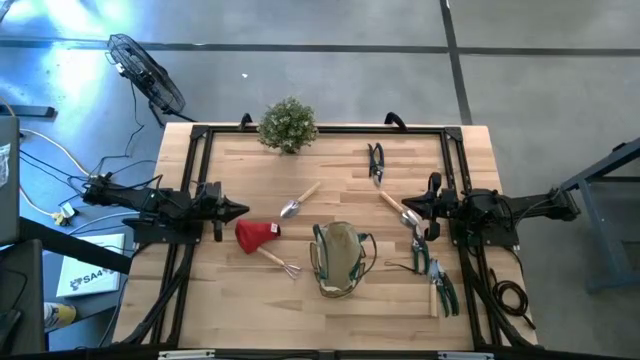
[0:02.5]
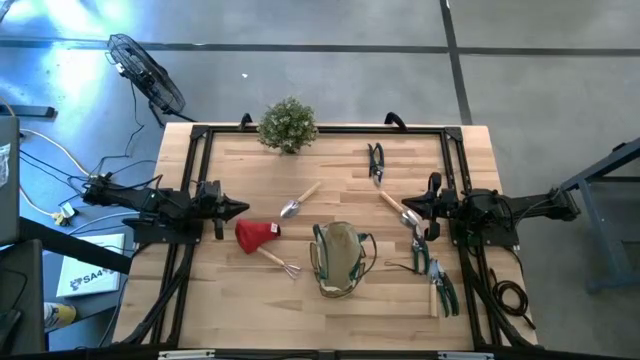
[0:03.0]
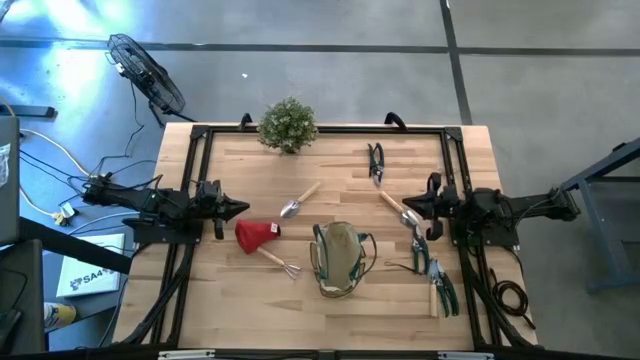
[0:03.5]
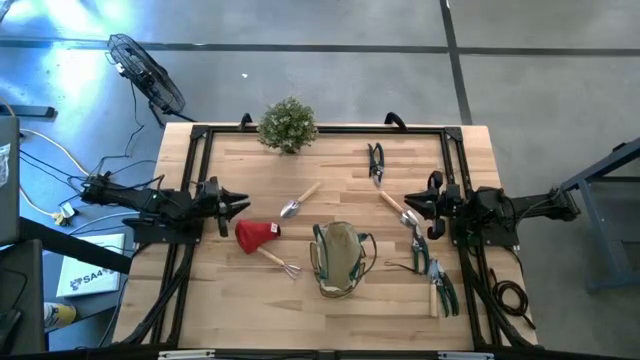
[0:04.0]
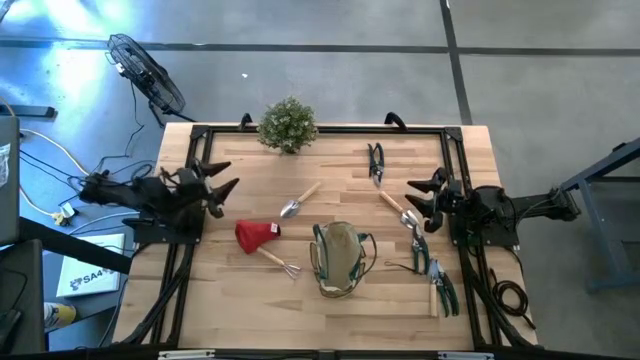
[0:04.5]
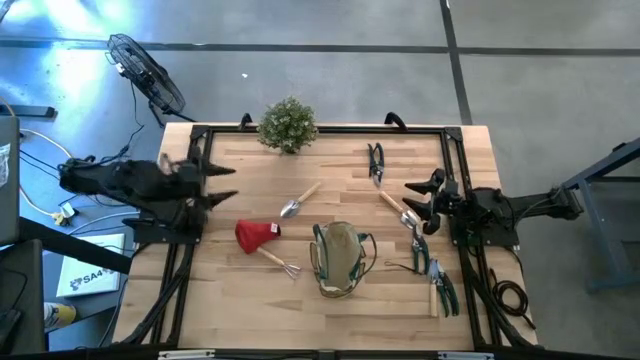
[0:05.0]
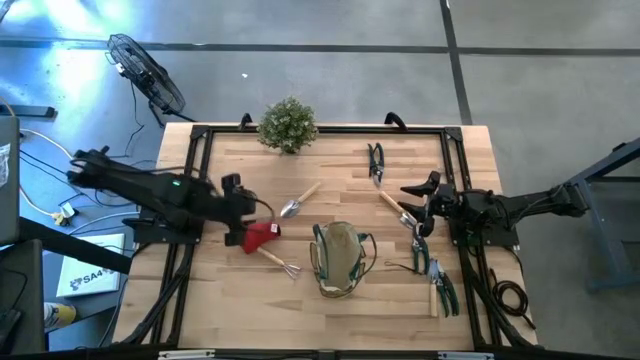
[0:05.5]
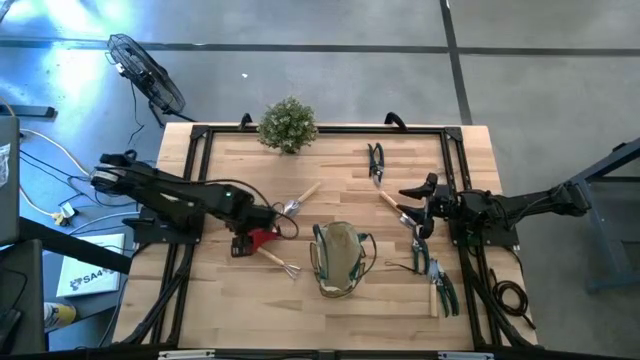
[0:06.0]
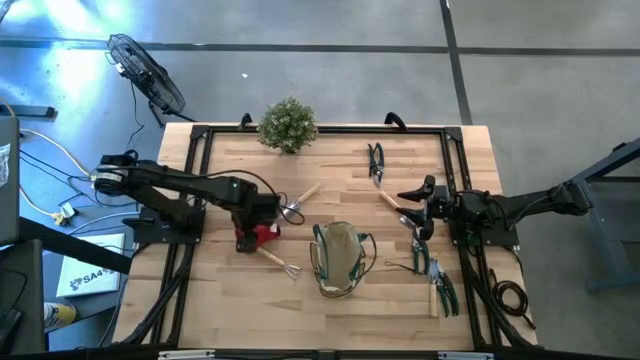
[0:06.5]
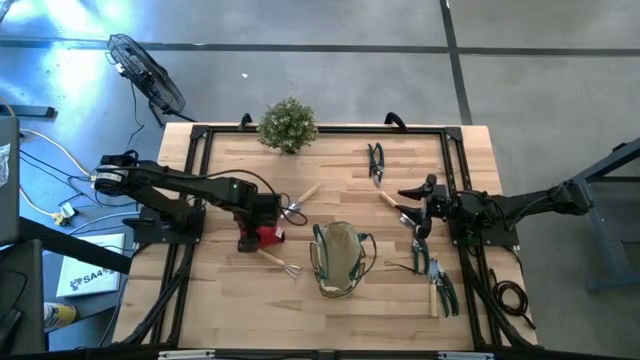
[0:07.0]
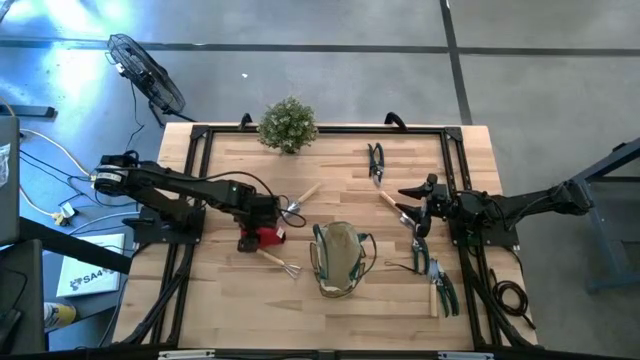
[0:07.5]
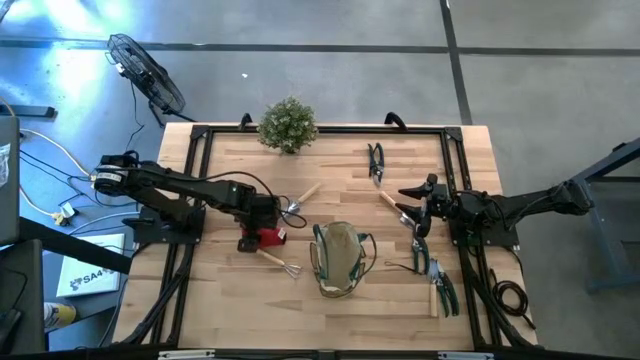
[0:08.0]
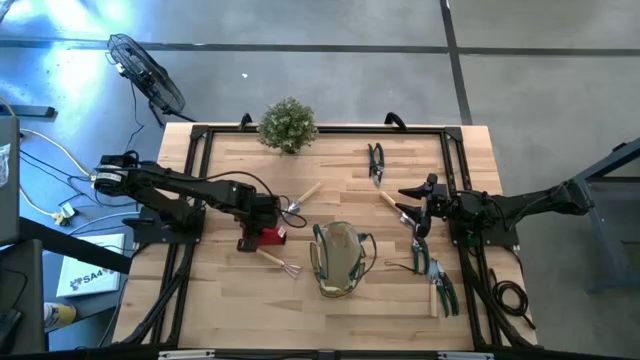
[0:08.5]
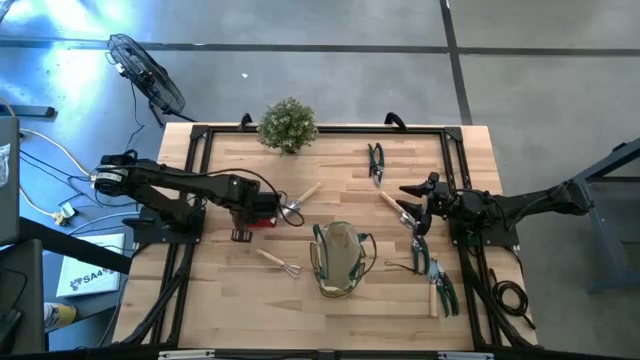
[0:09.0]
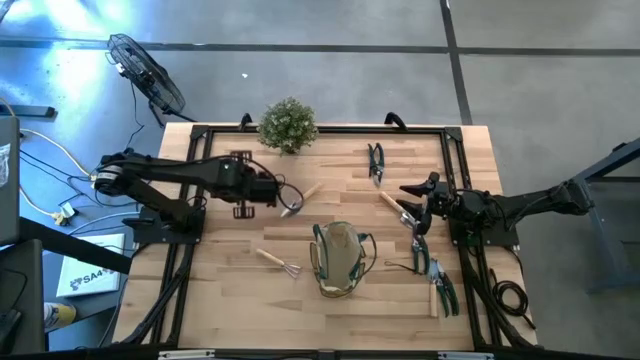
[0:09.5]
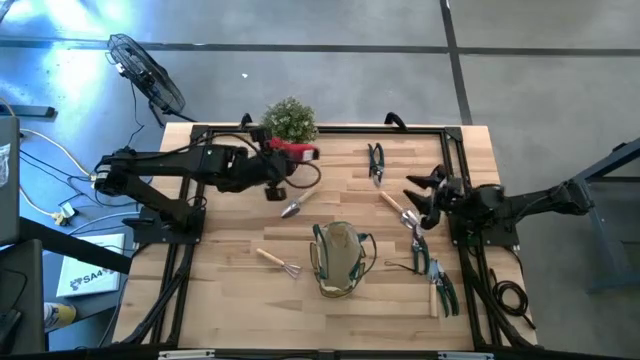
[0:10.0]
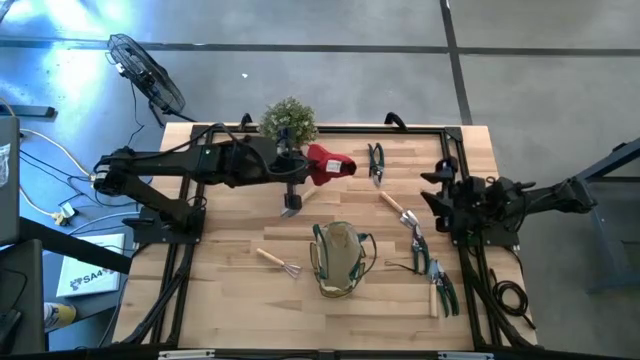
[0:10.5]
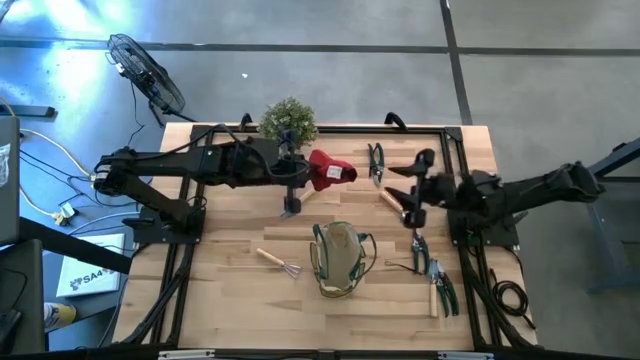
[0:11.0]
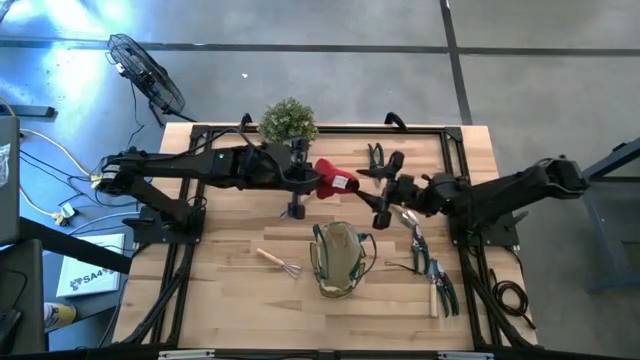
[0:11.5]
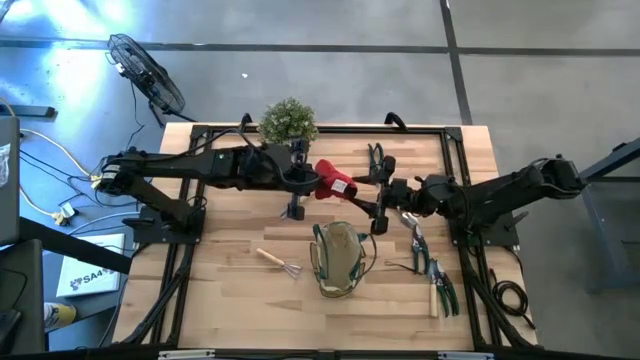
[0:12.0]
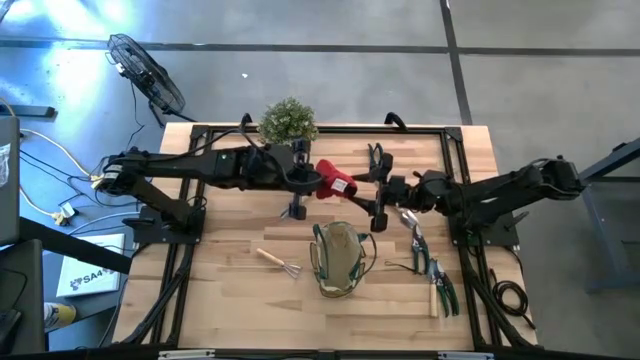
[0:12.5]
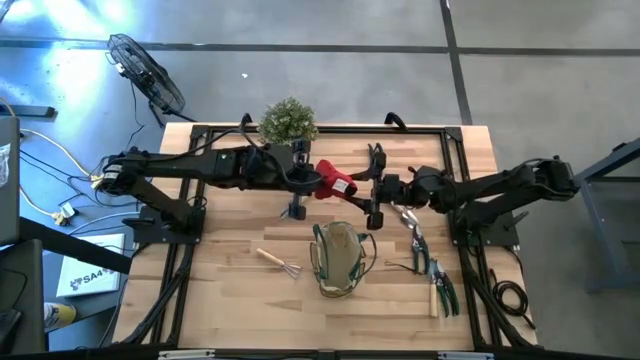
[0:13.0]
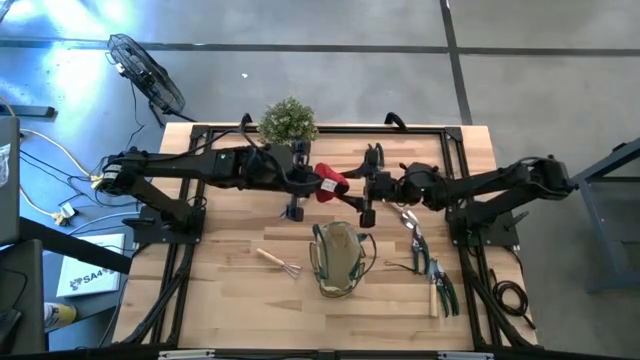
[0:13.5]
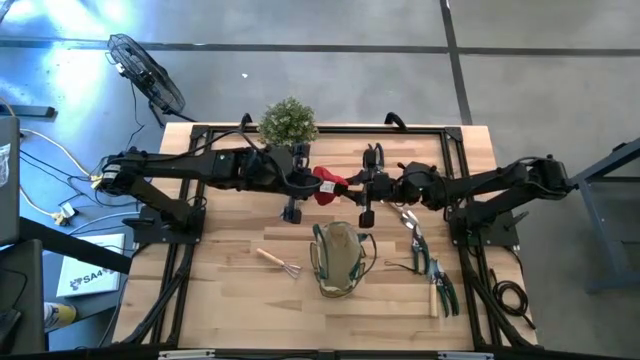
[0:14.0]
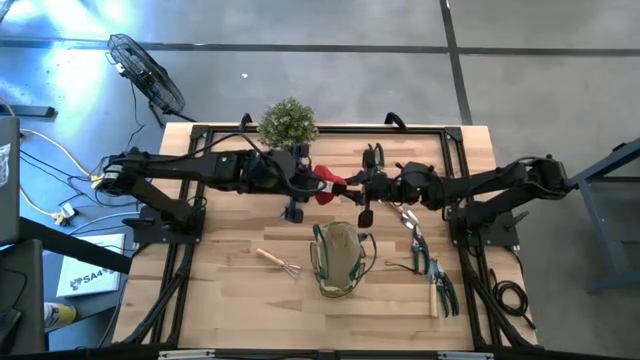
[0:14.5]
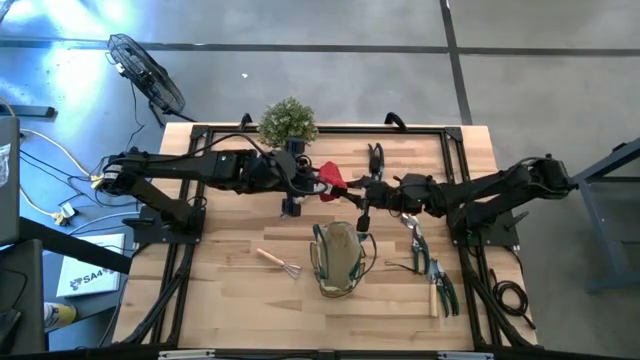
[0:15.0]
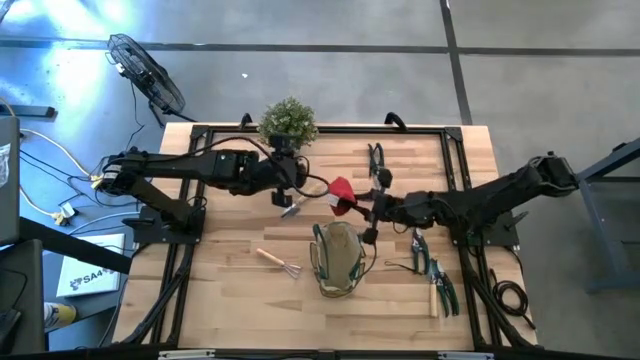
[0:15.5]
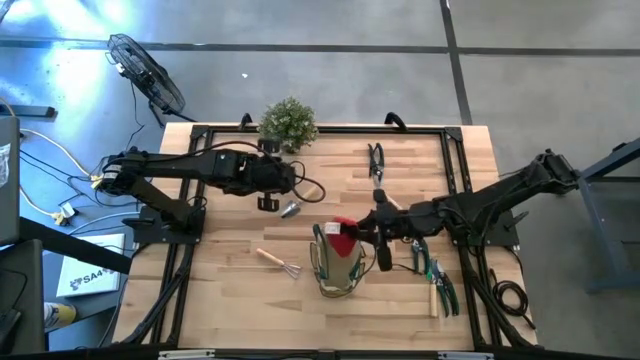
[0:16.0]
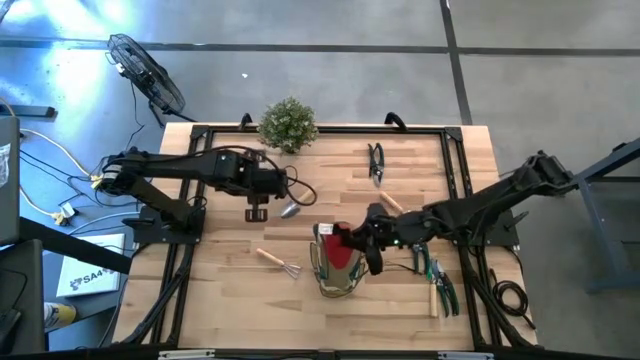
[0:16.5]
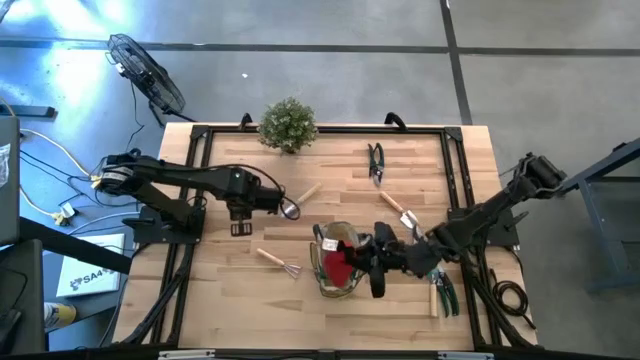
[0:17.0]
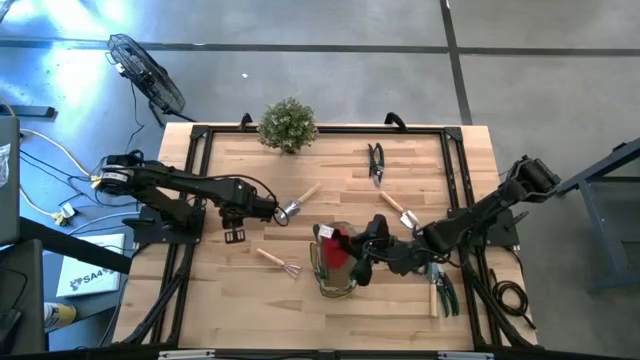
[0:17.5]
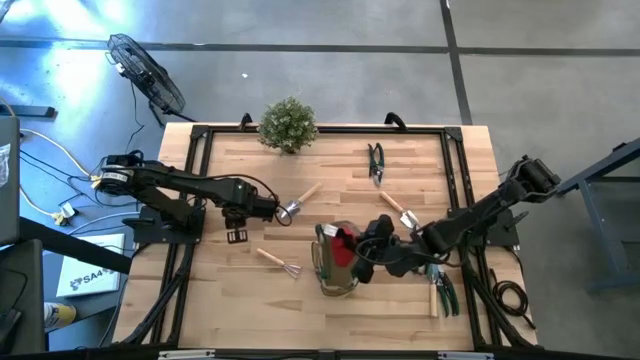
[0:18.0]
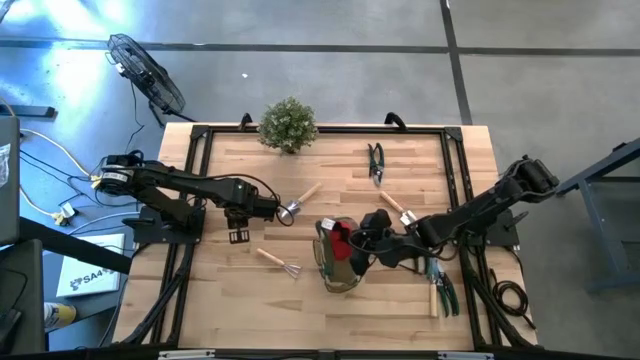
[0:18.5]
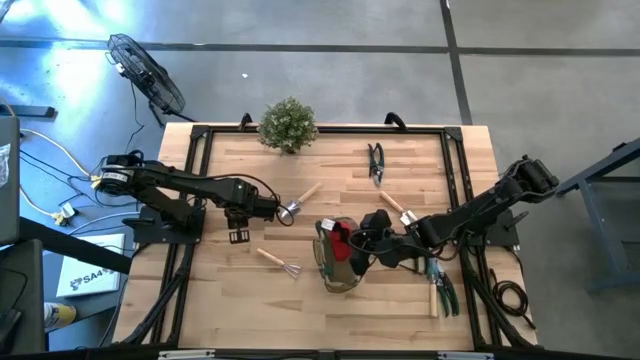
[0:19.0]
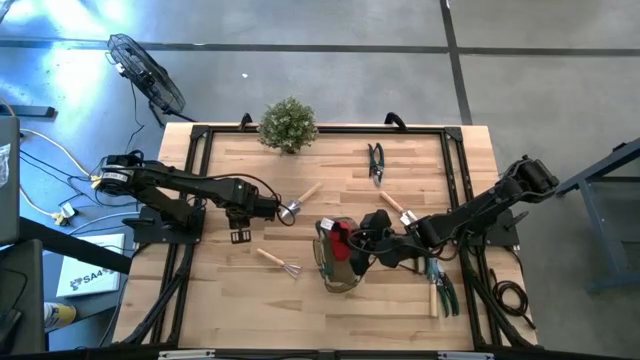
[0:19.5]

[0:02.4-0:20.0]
Task: Pick & Place Garden tools in Gardening bag
Put the red gloves into the green bag

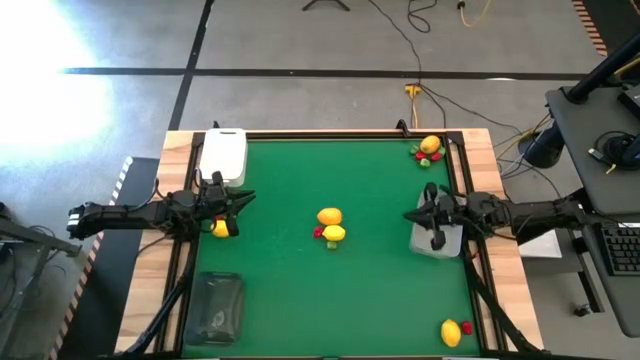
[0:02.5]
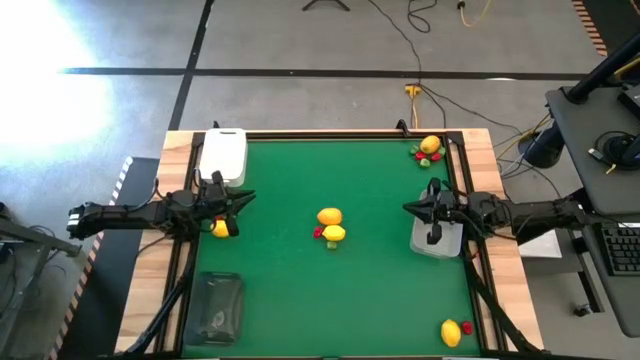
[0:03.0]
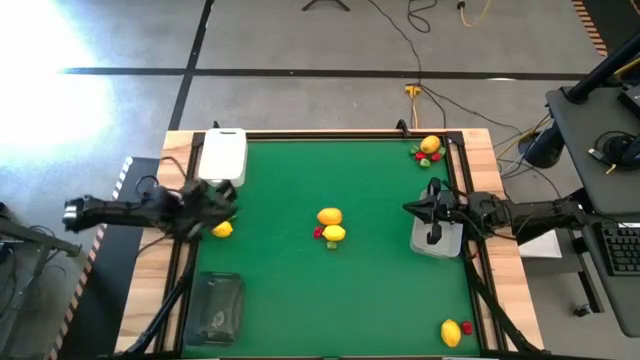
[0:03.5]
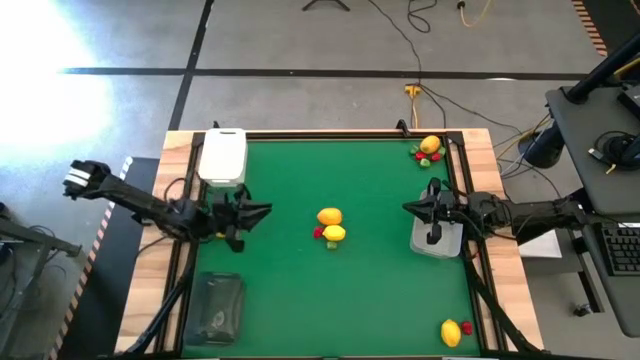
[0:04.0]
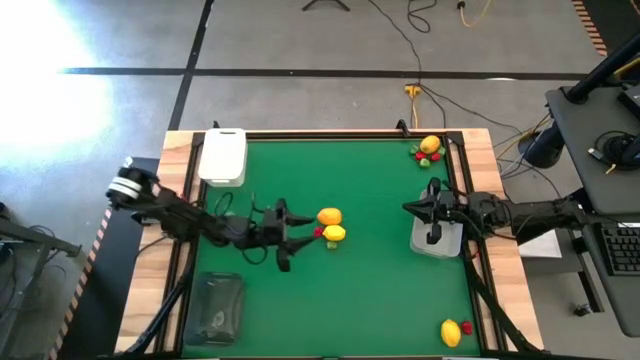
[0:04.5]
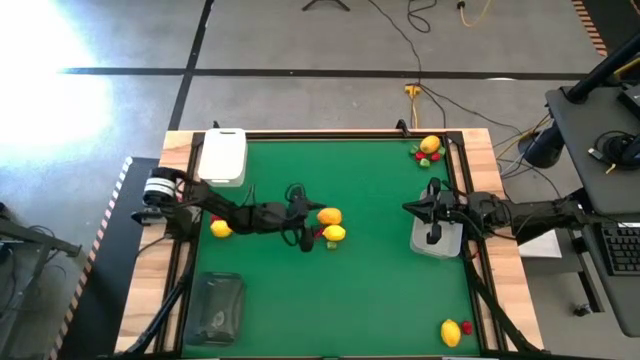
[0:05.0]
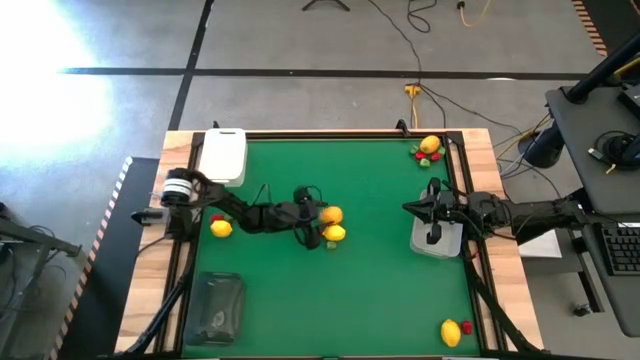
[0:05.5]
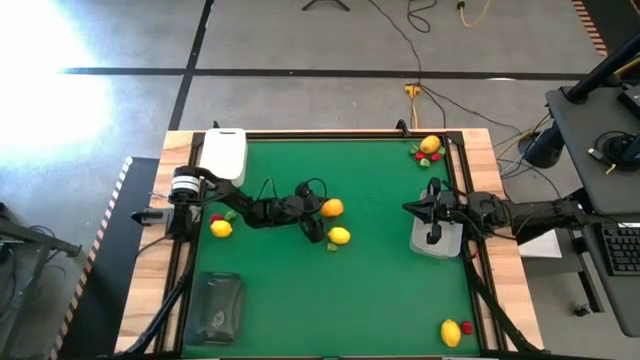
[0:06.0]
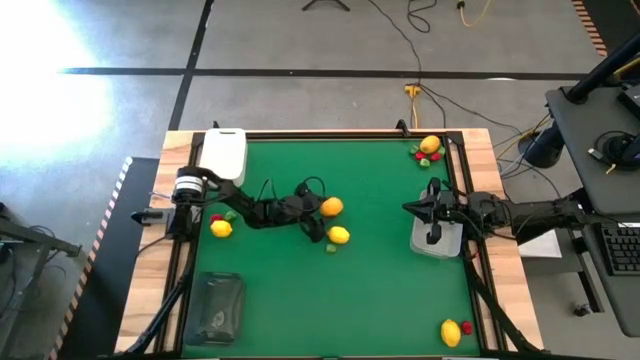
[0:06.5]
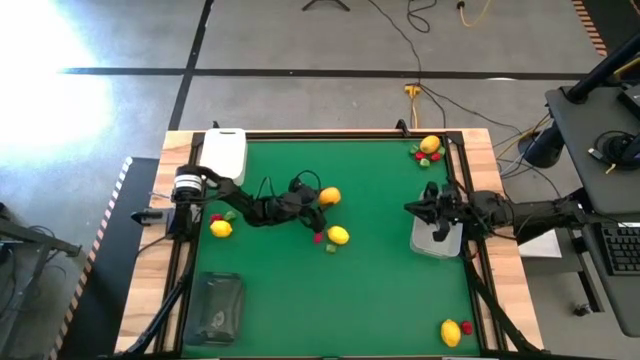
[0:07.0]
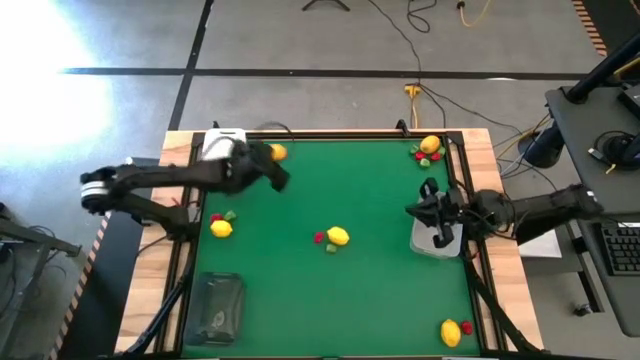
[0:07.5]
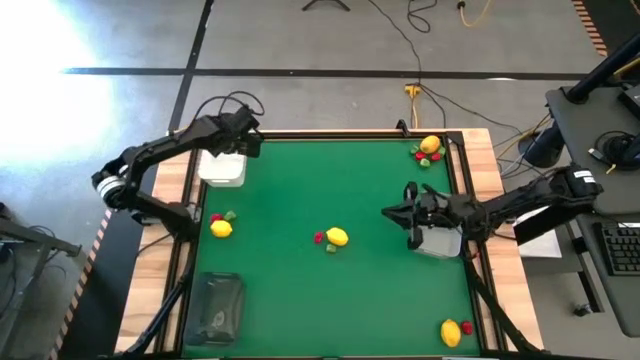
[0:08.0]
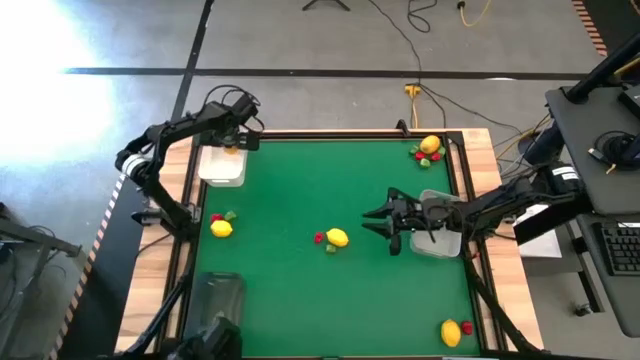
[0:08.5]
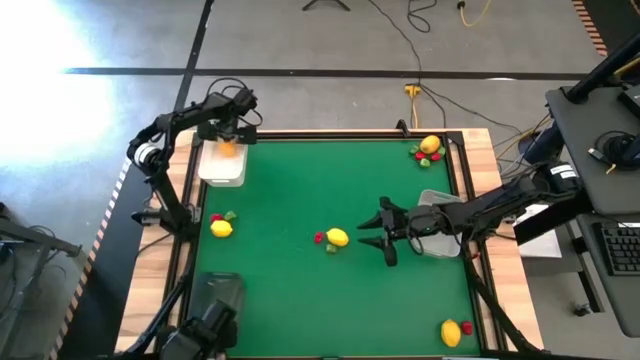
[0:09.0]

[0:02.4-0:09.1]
Task: Sort produce into baskets
Put the yellow lemon into the white bin
